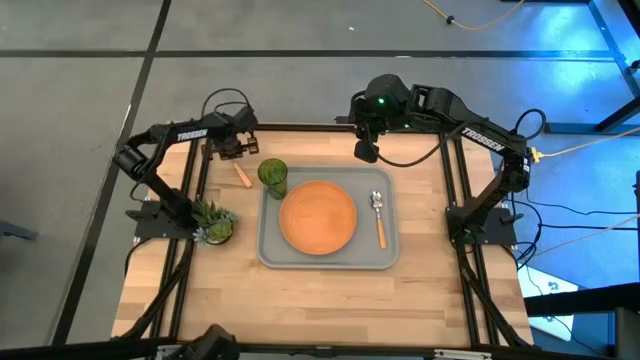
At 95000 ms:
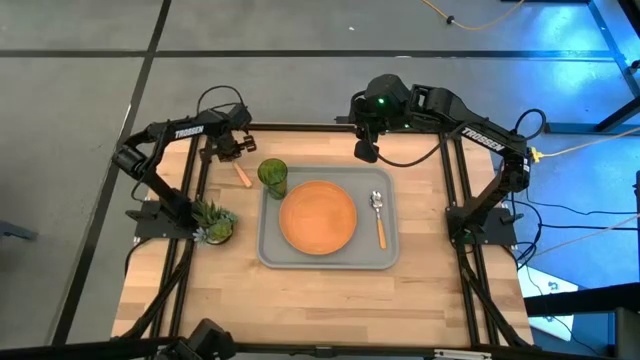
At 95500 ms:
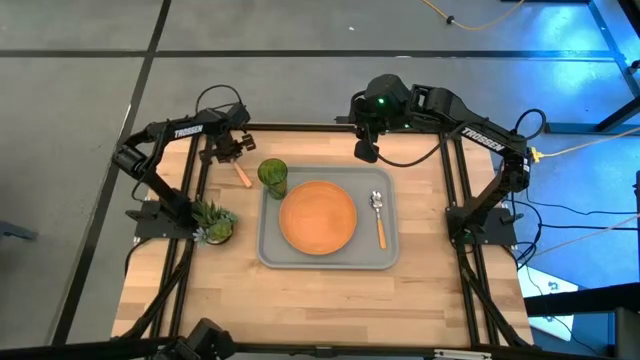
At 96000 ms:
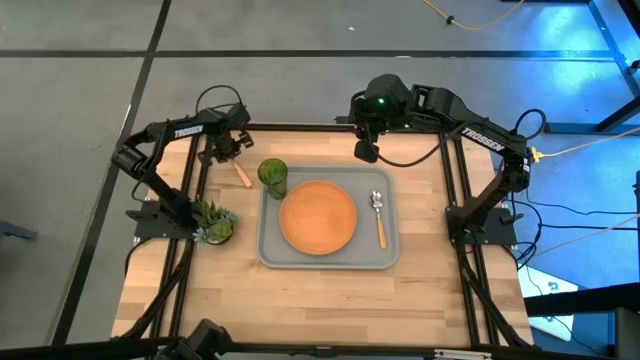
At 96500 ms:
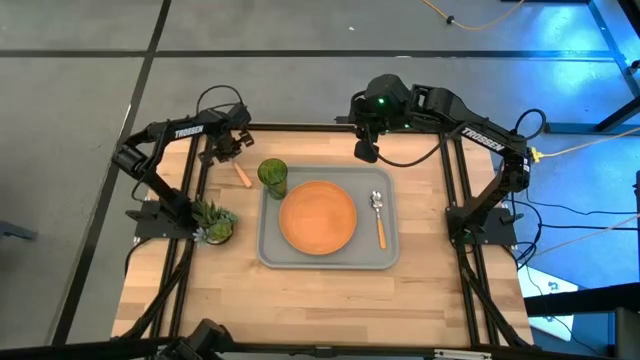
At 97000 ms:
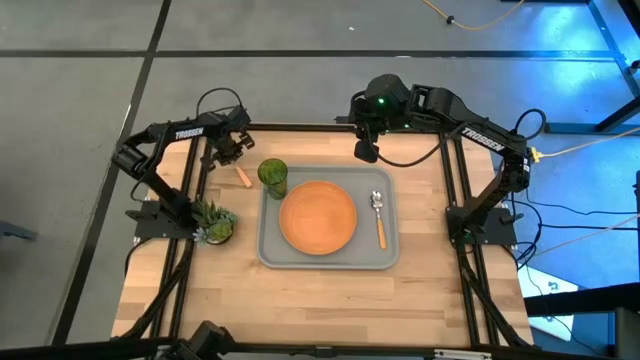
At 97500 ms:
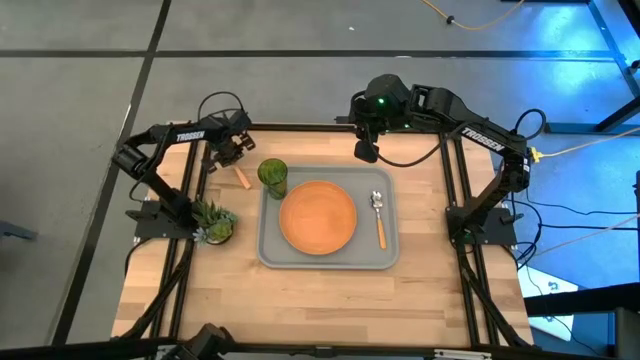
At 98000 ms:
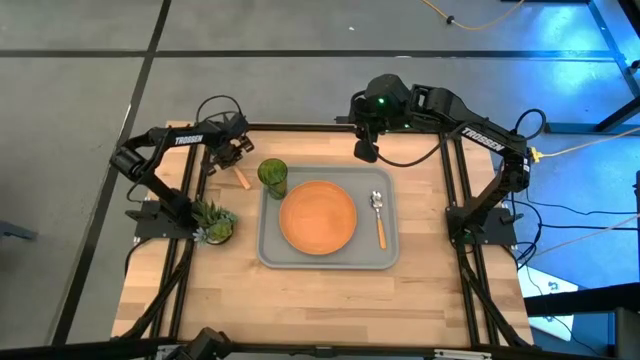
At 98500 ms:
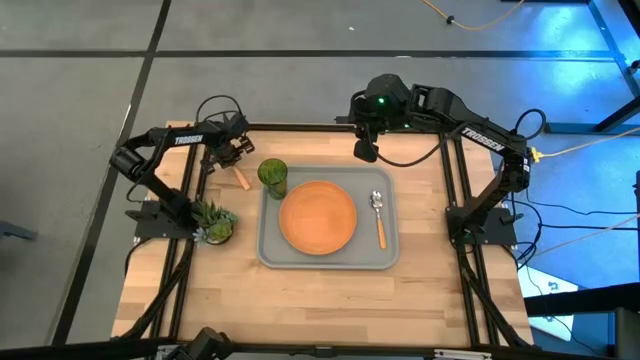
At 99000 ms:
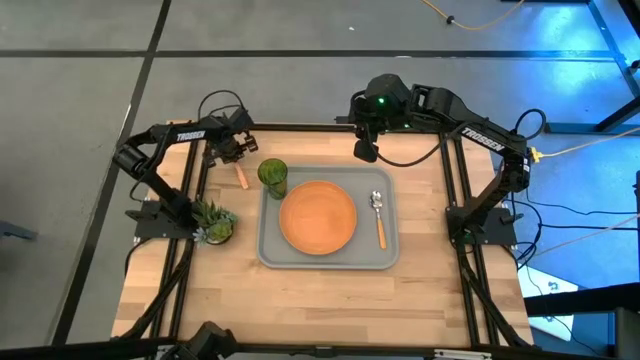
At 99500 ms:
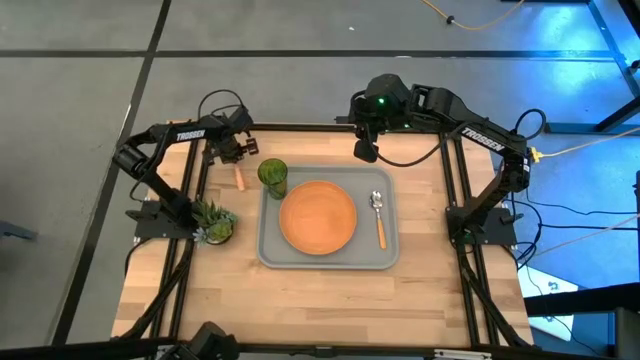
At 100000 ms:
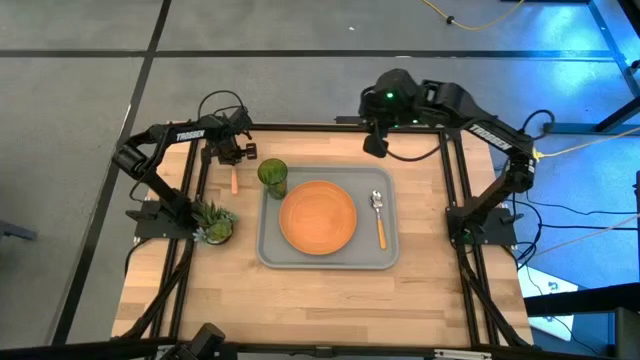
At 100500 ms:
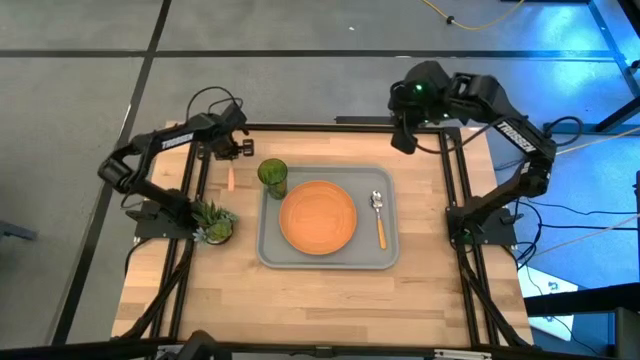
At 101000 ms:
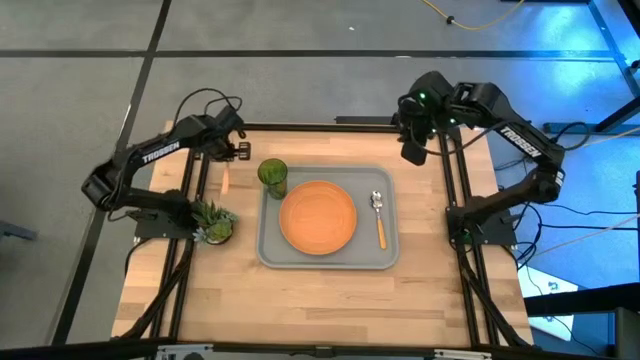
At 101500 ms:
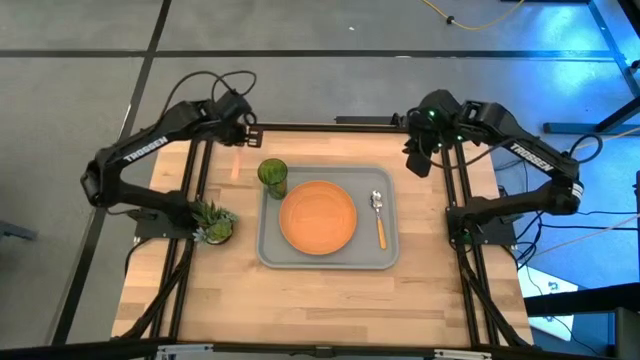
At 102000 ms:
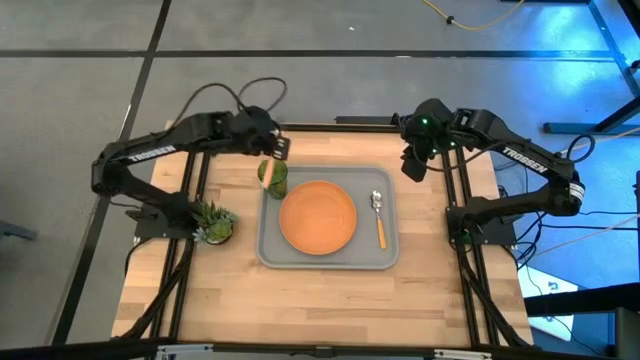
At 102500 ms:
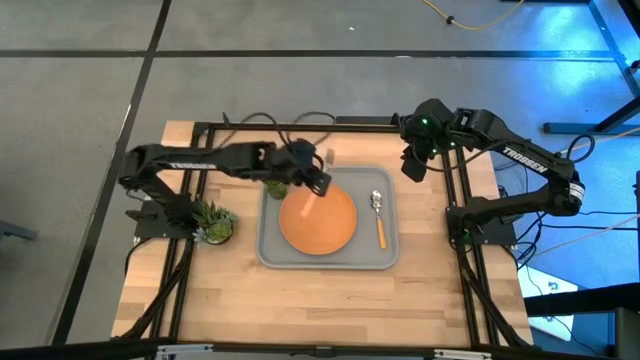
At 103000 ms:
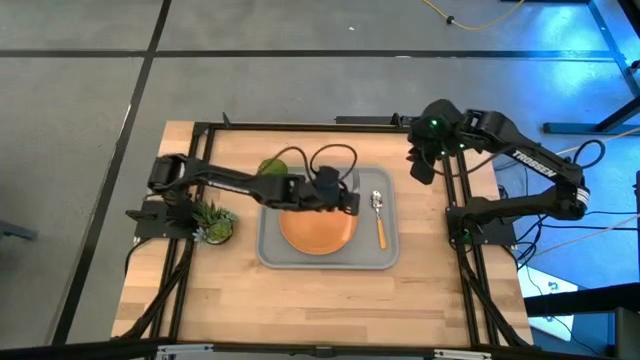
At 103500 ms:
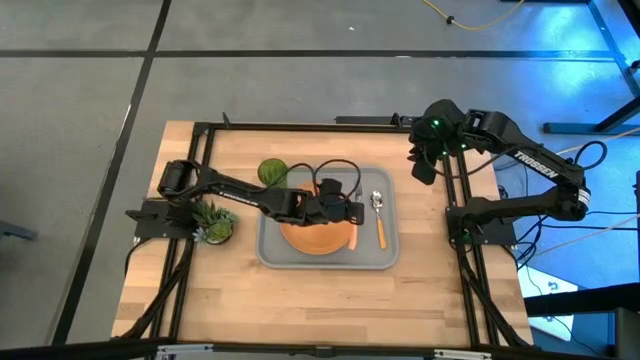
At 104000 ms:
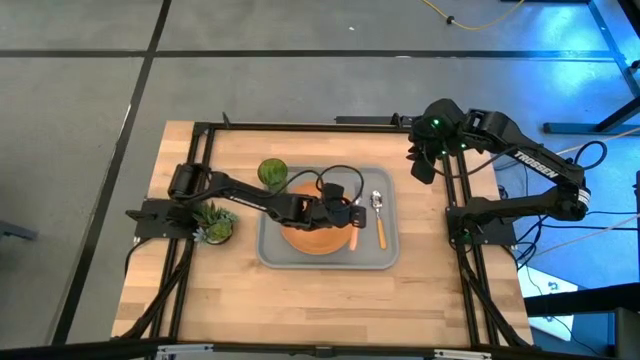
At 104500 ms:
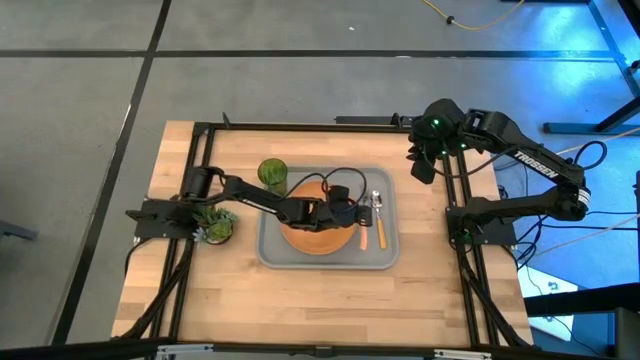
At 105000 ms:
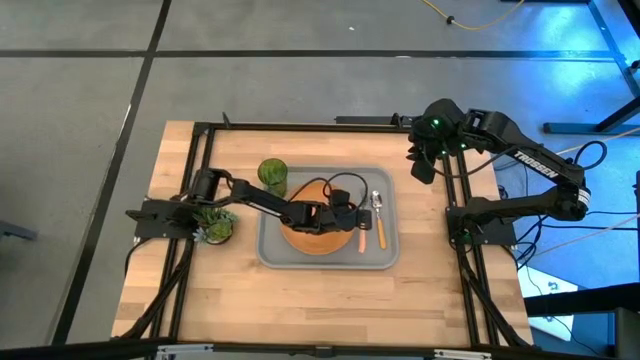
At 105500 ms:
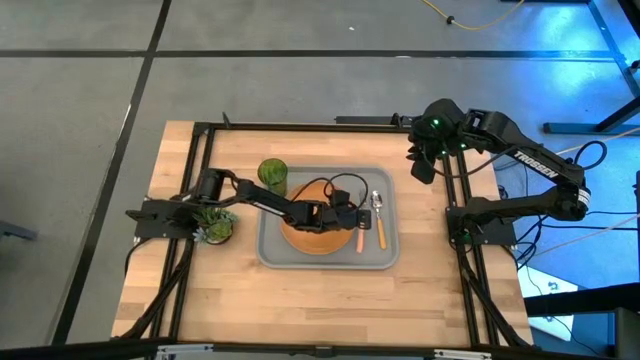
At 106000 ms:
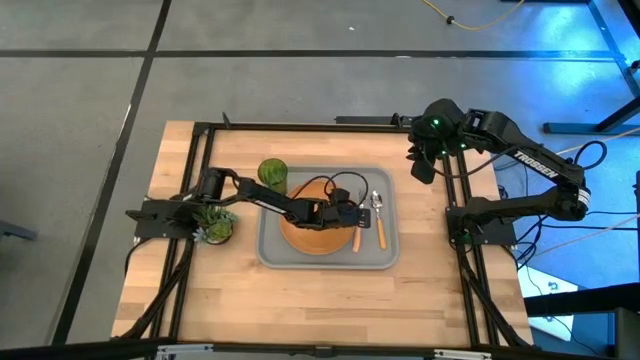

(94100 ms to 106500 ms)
Task: Pick and place plate/cup/fork/spoon on tray
Put the orange fork on the gray food tray to the right of the orange plate

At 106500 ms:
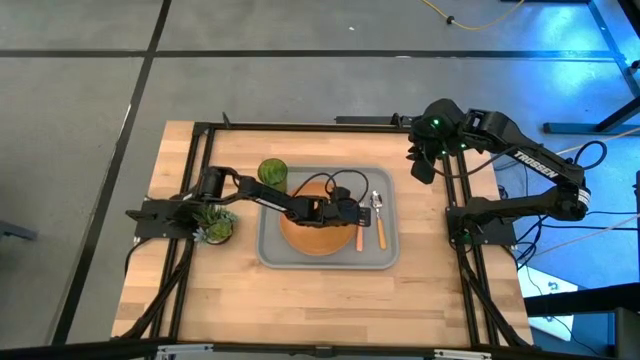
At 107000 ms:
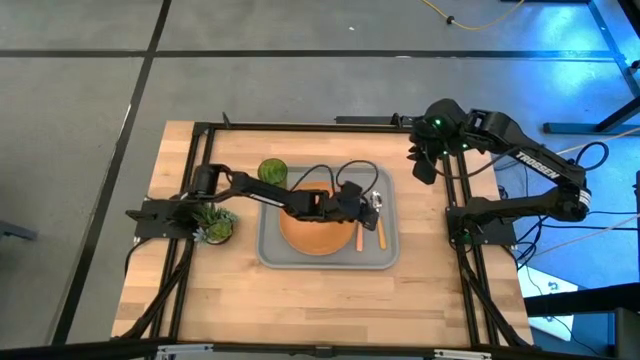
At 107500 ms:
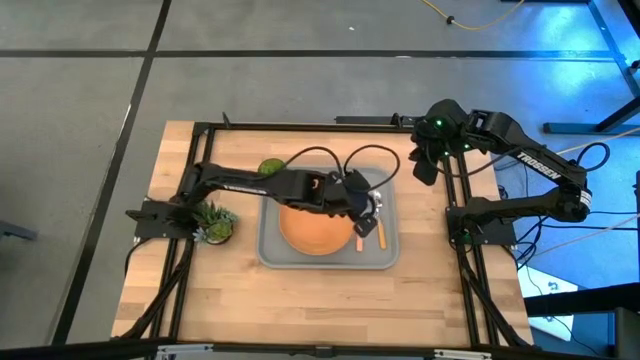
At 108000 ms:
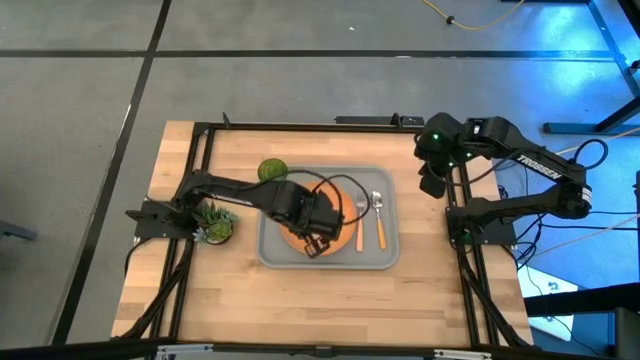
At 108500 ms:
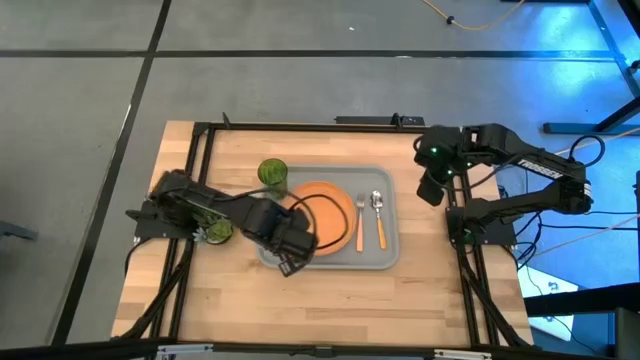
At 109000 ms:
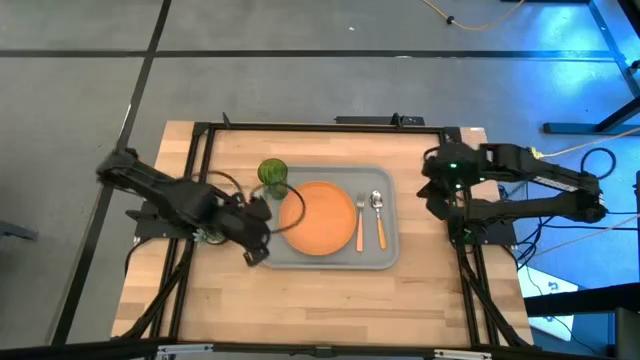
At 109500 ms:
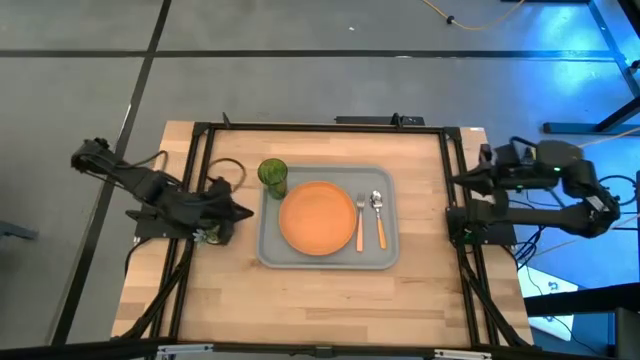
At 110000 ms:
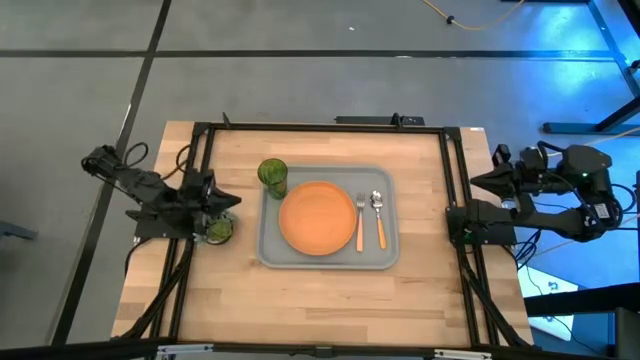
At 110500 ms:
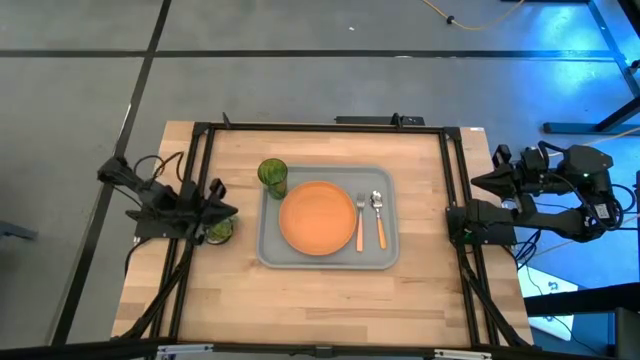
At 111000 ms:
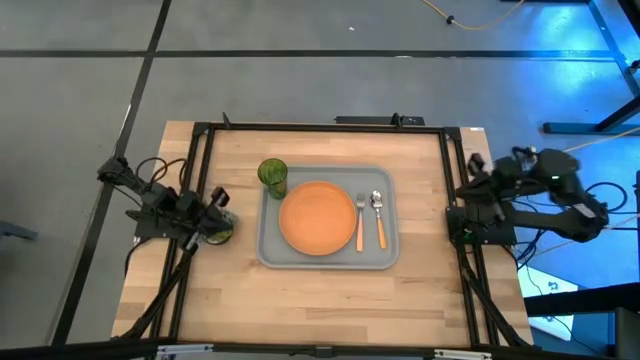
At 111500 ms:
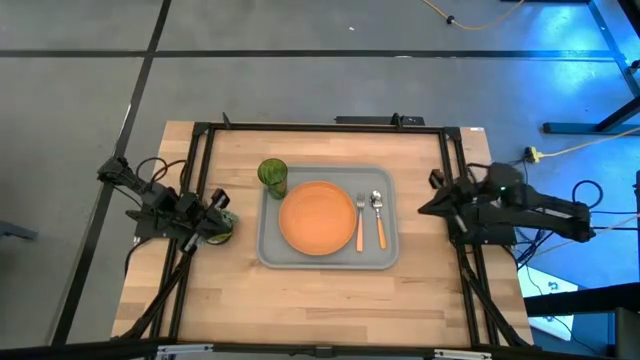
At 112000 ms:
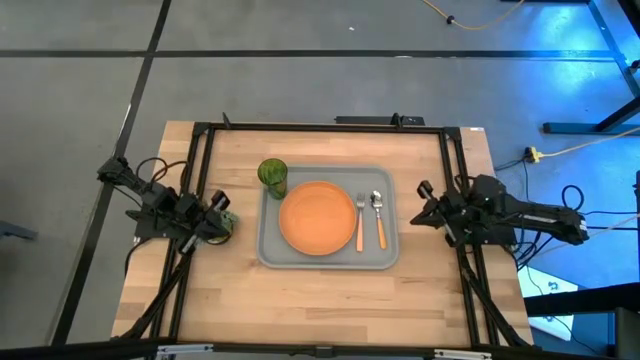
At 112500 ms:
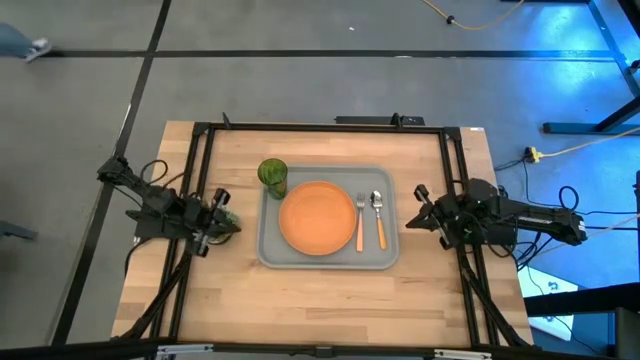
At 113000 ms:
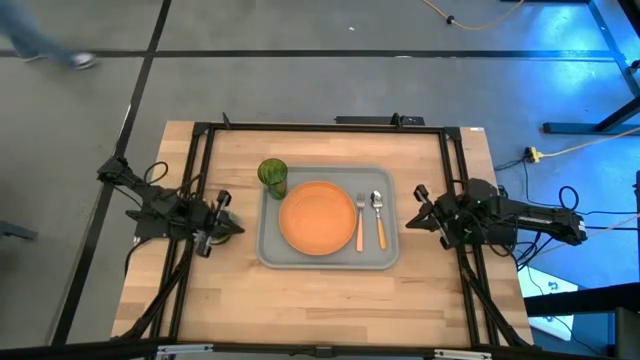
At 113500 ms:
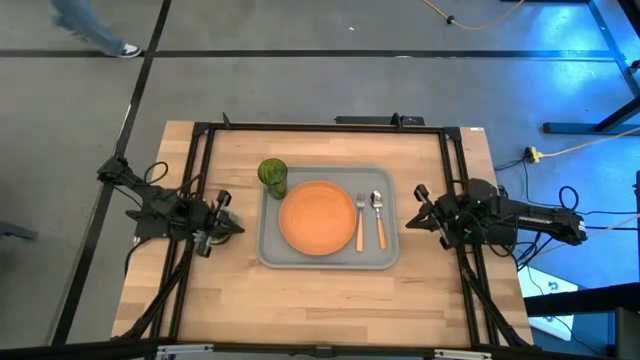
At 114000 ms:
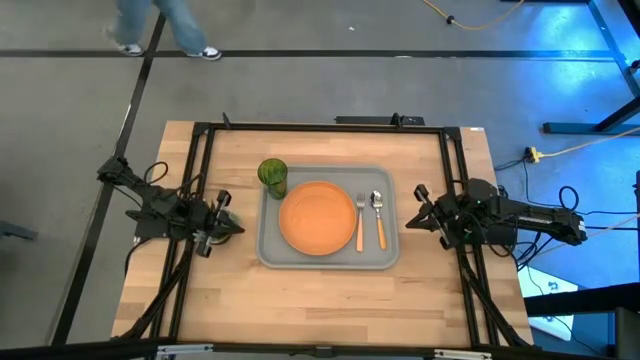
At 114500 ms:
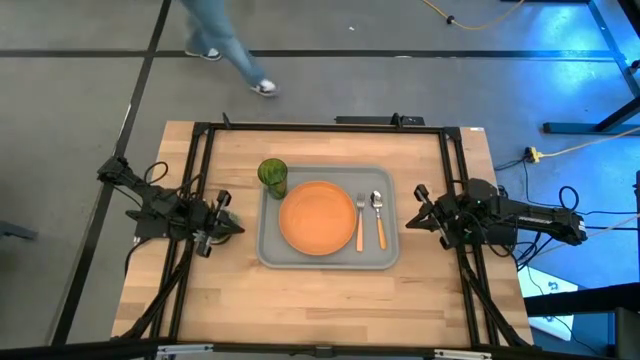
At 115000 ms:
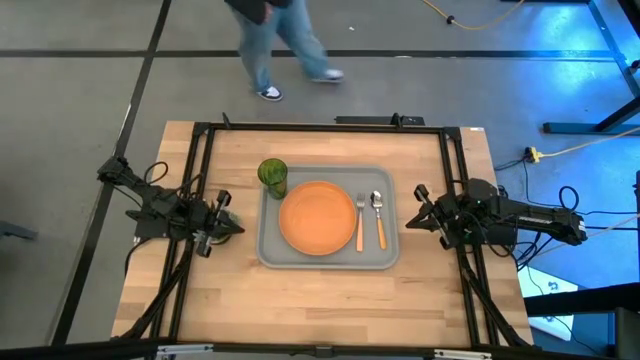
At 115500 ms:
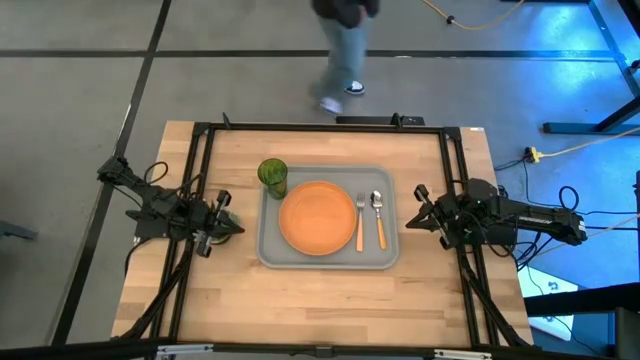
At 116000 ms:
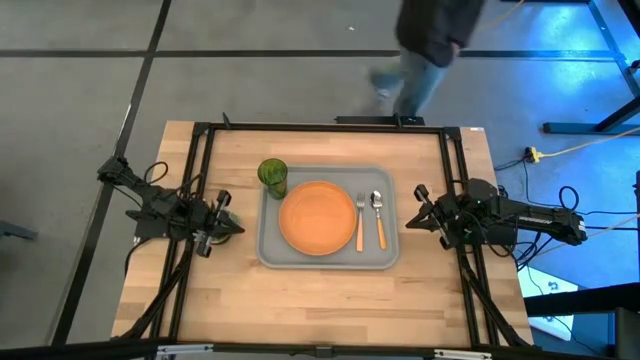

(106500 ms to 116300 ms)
Return to Home Position
